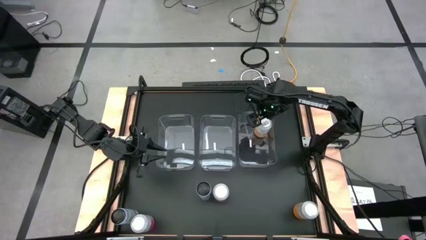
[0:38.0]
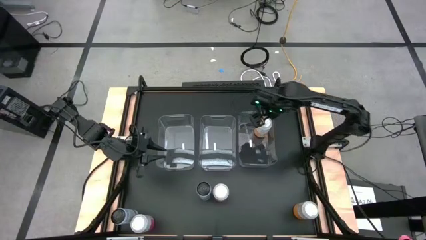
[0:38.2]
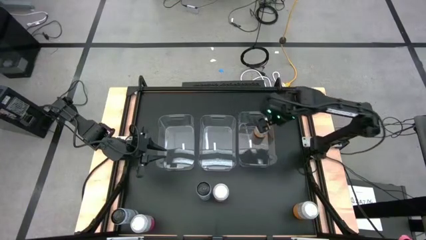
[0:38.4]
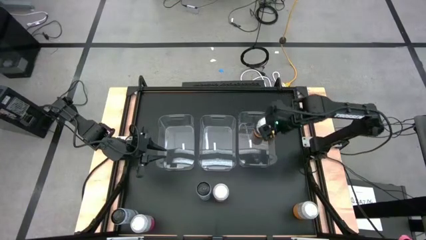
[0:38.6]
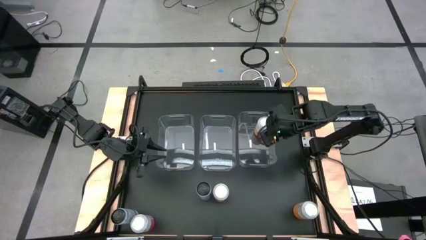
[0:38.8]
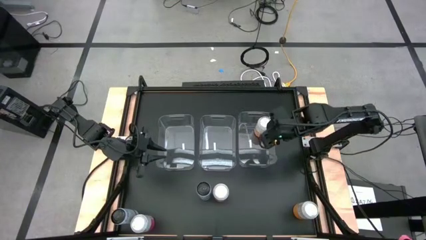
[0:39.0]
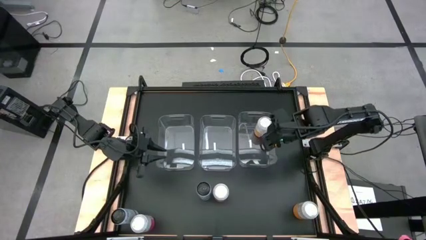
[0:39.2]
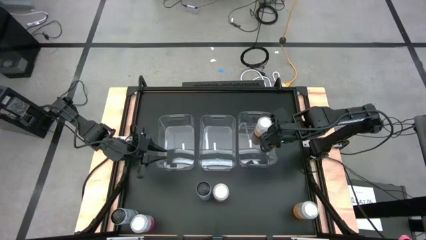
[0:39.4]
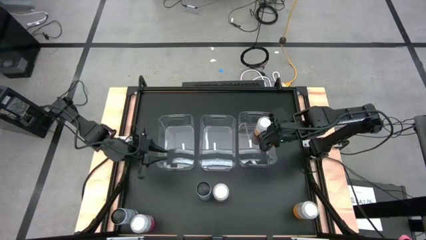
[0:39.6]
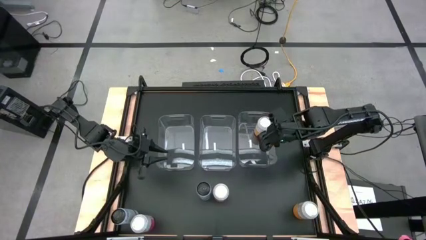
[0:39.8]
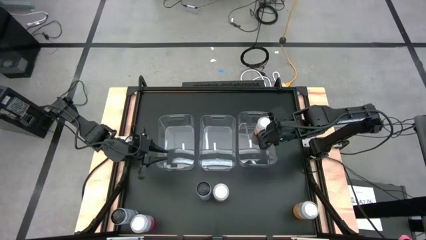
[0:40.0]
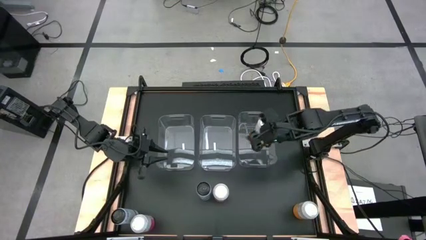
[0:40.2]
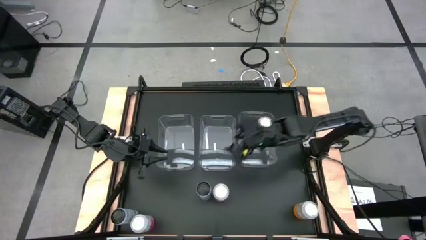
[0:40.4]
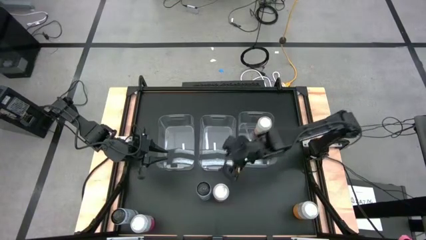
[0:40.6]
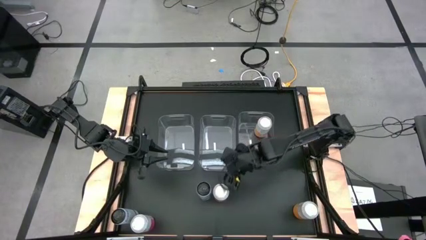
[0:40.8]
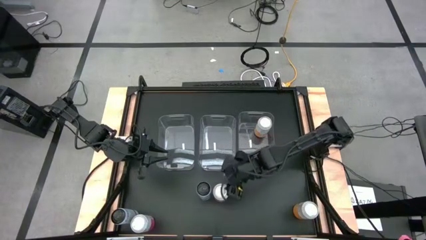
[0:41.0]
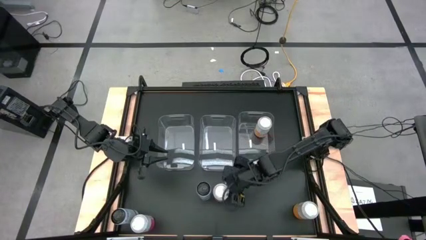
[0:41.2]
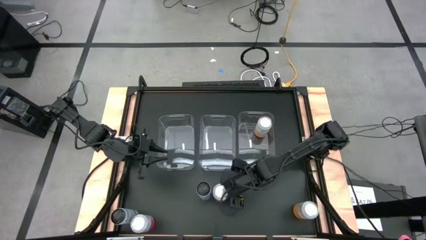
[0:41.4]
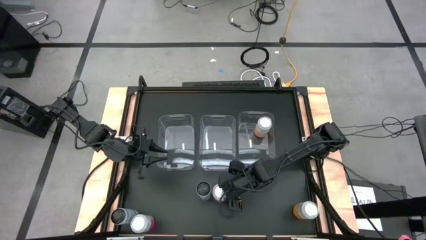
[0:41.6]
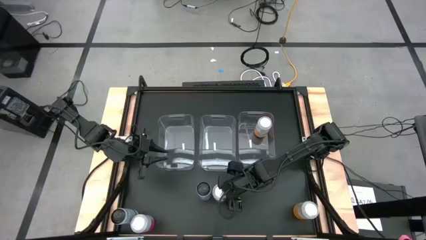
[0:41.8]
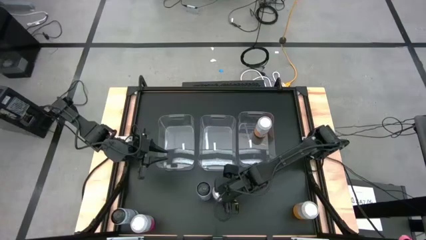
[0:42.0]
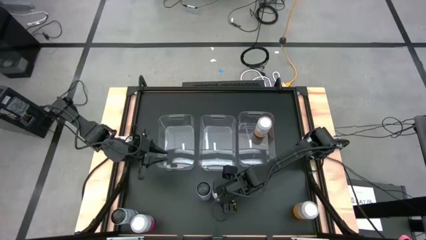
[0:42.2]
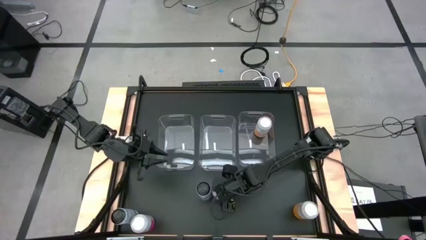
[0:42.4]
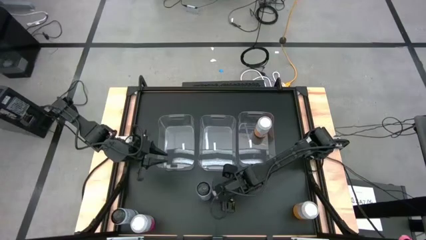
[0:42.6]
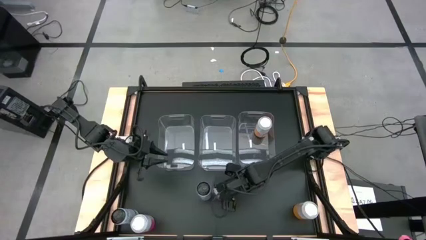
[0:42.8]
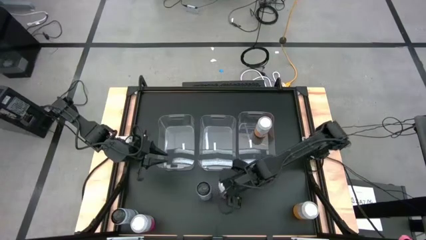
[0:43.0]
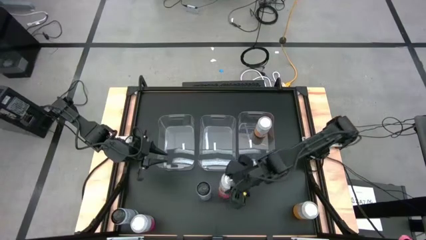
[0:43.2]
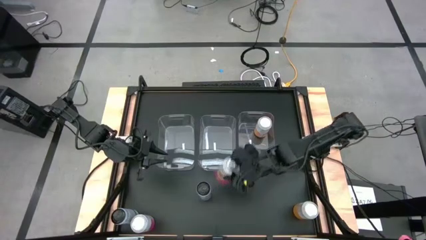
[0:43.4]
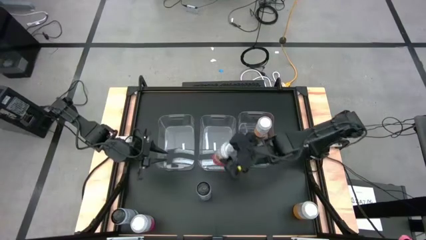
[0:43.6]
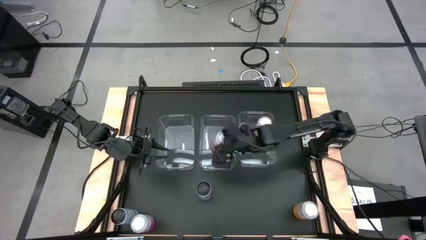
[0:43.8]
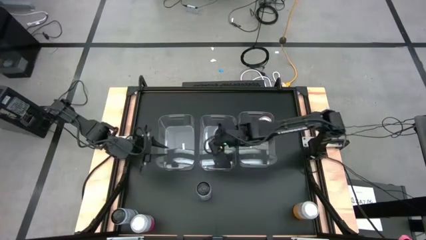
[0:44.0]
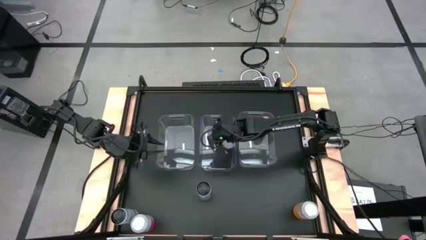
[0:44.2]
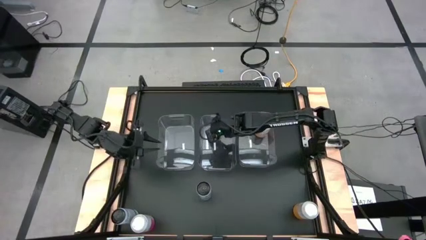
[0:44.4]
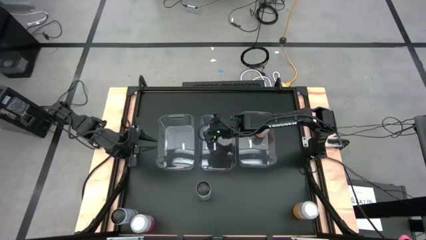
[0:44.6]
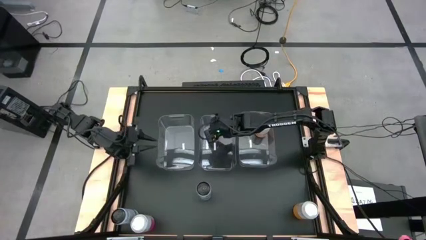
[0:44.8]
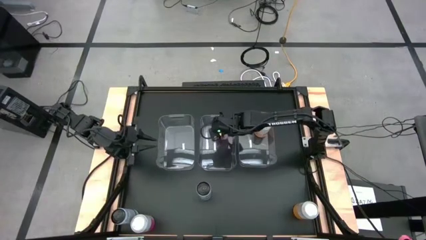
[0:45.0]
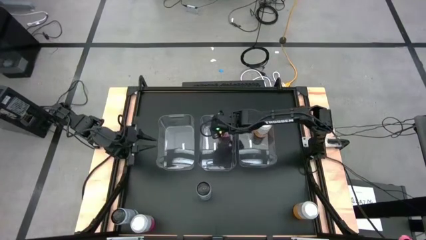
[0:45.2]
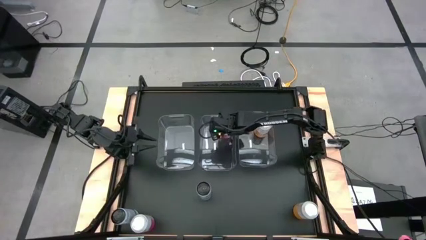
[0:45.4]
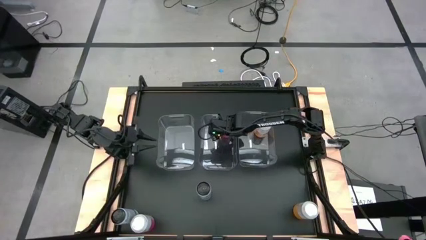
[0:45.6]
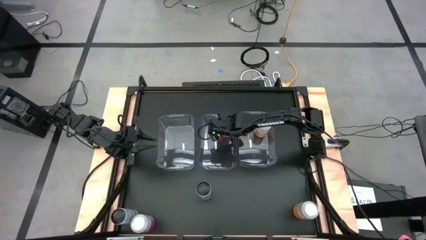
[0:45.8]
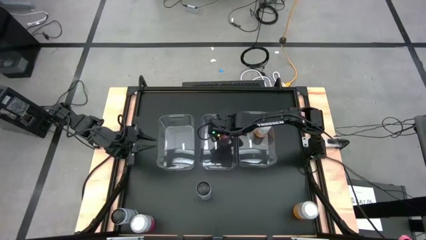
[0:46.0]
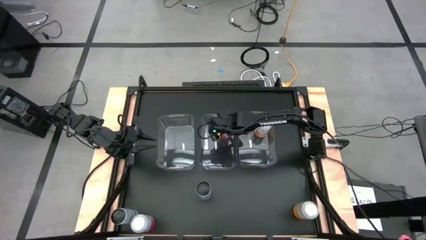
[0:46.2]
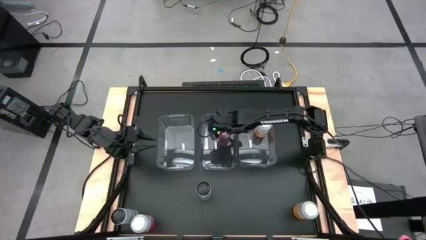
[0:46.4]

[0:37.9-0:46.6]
Task: Sort soda cans
Put the right pink-white soda can into the middle transparent bin

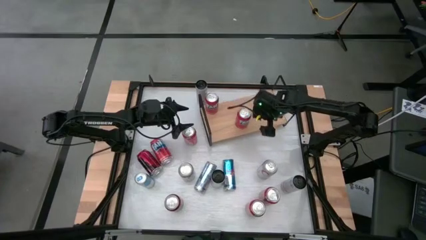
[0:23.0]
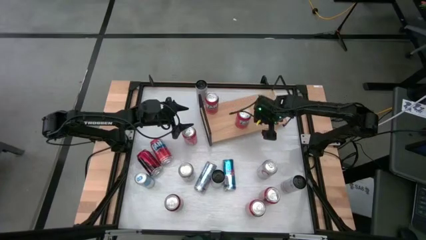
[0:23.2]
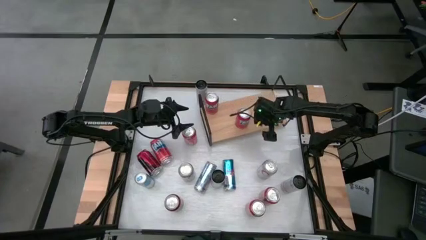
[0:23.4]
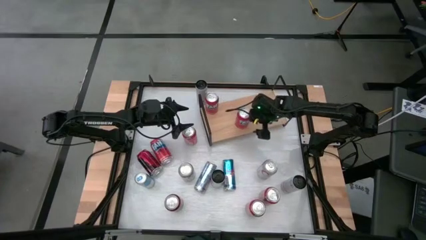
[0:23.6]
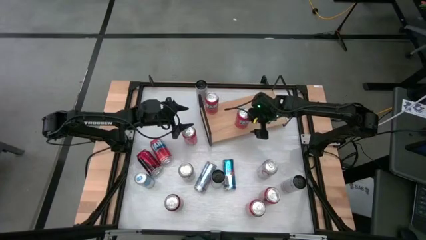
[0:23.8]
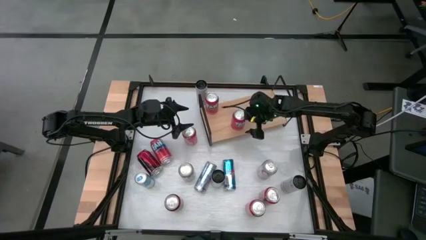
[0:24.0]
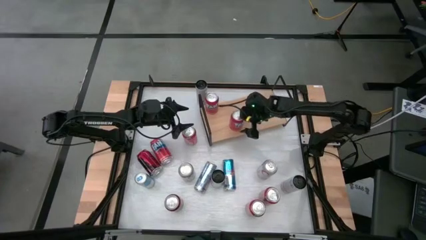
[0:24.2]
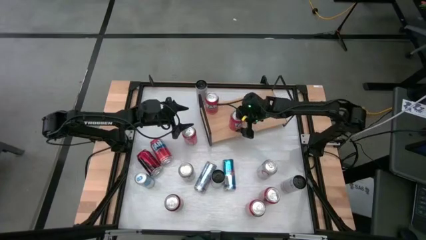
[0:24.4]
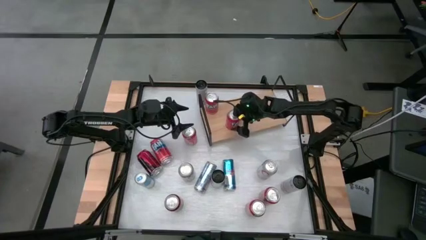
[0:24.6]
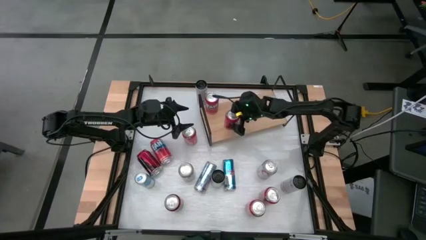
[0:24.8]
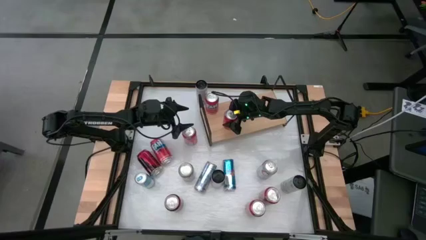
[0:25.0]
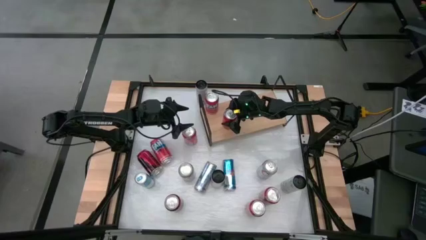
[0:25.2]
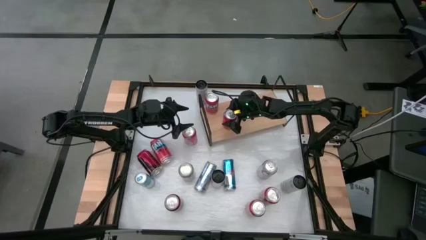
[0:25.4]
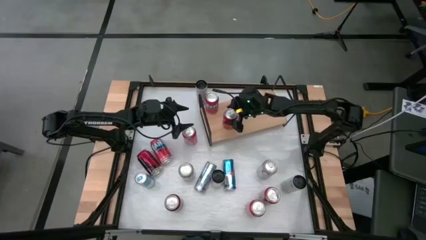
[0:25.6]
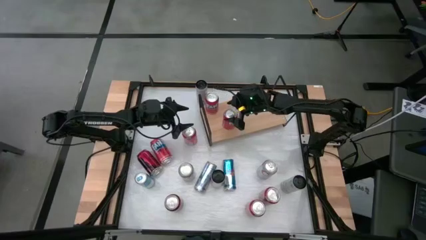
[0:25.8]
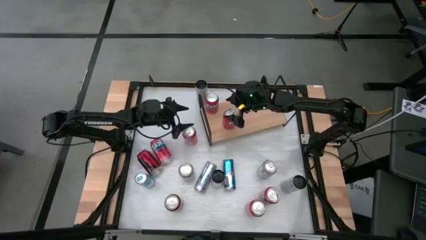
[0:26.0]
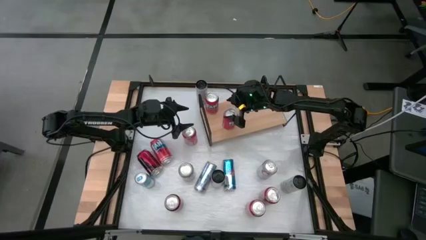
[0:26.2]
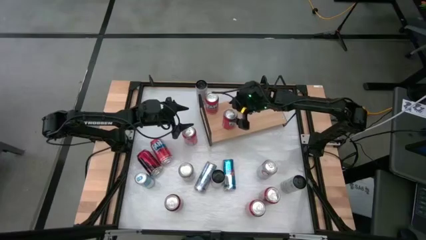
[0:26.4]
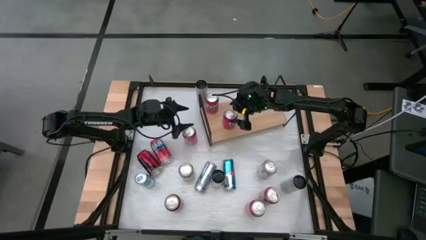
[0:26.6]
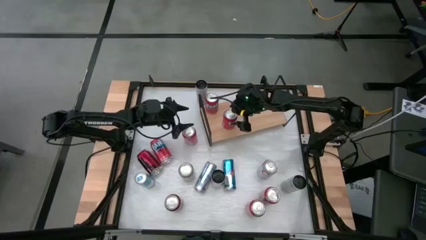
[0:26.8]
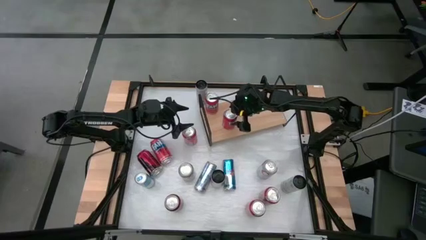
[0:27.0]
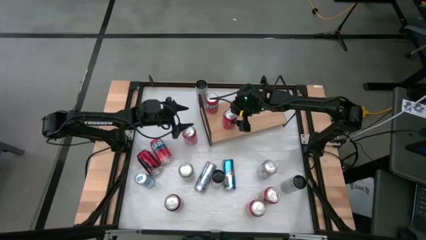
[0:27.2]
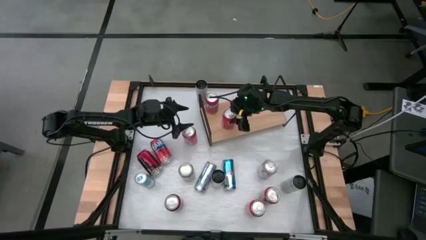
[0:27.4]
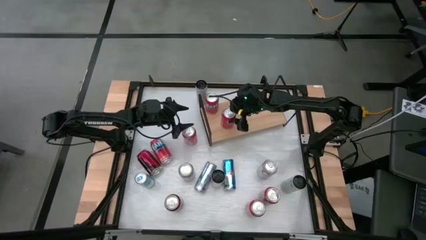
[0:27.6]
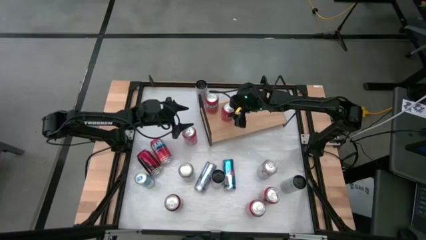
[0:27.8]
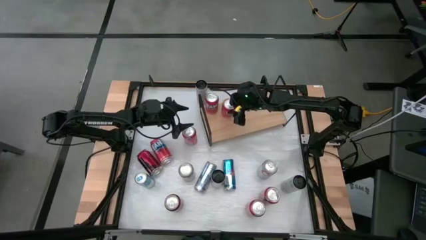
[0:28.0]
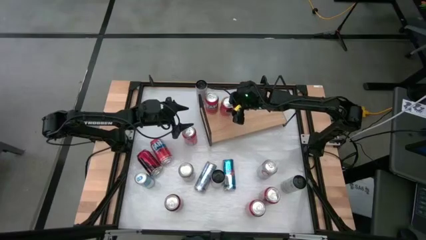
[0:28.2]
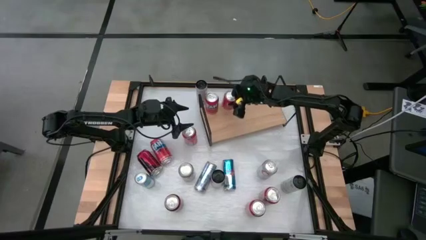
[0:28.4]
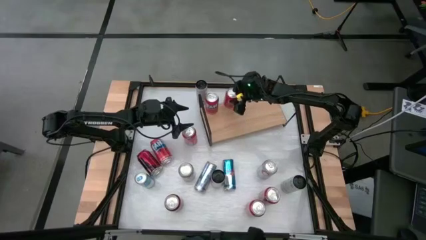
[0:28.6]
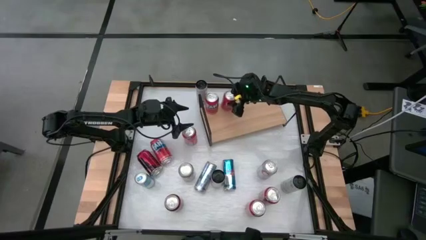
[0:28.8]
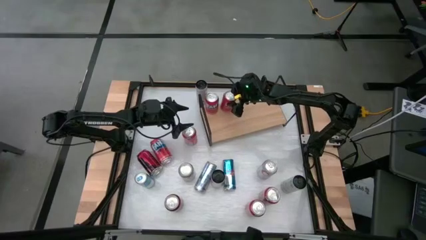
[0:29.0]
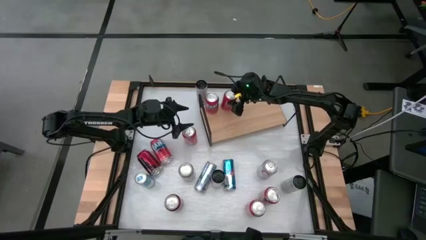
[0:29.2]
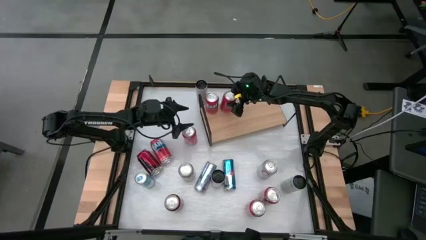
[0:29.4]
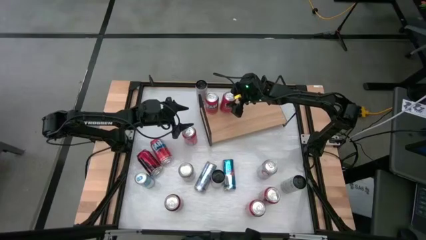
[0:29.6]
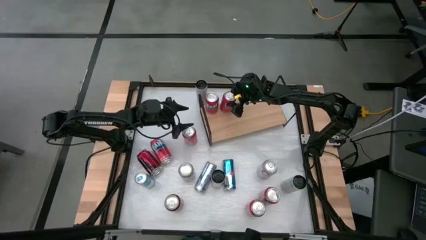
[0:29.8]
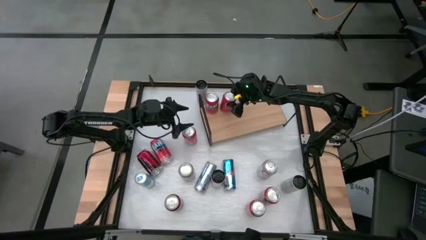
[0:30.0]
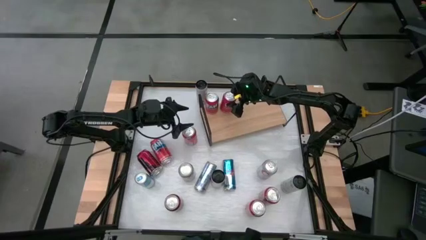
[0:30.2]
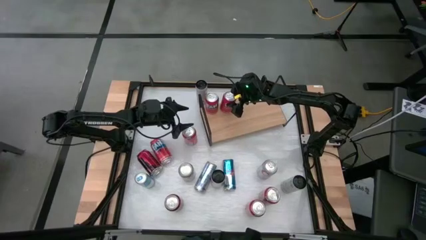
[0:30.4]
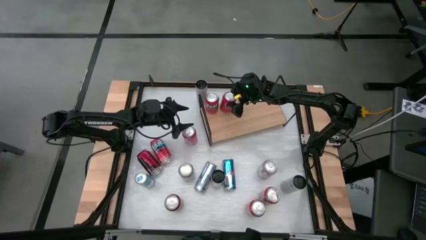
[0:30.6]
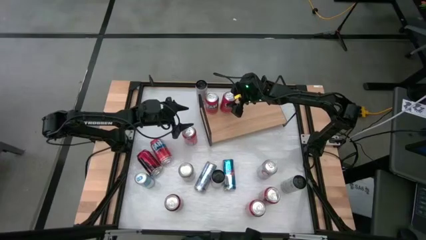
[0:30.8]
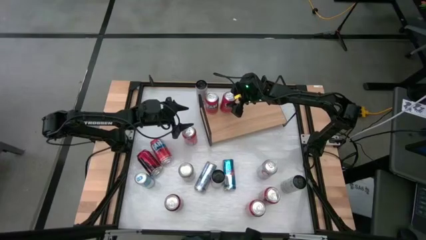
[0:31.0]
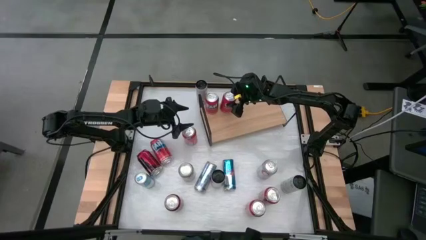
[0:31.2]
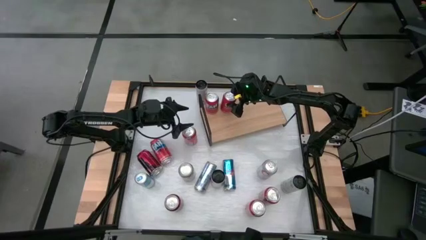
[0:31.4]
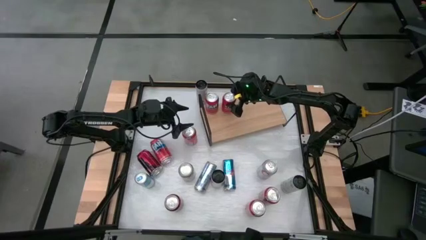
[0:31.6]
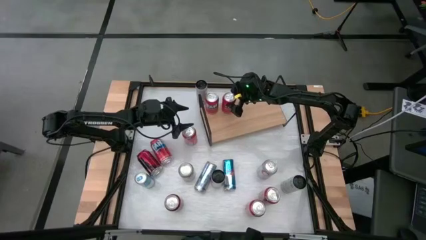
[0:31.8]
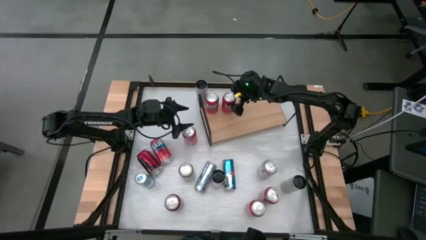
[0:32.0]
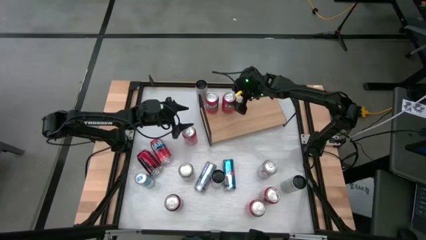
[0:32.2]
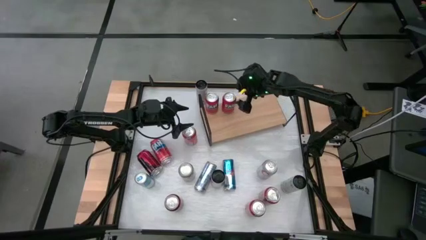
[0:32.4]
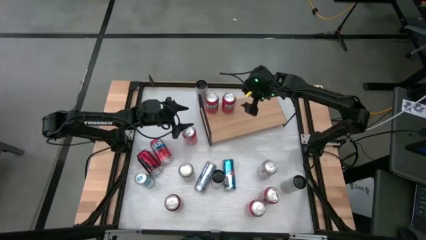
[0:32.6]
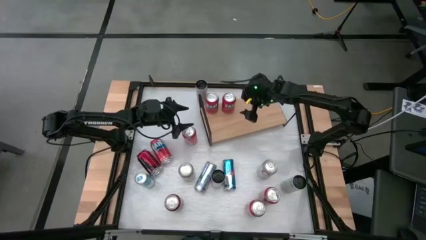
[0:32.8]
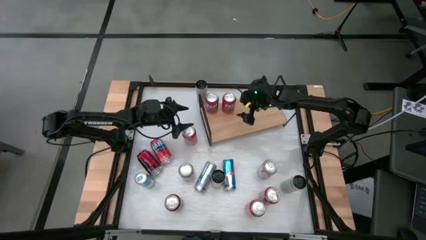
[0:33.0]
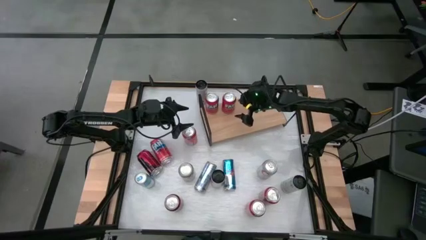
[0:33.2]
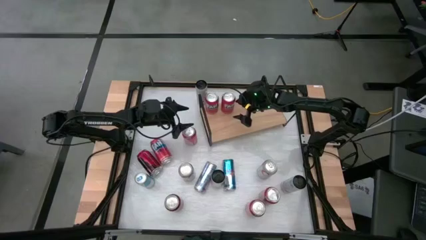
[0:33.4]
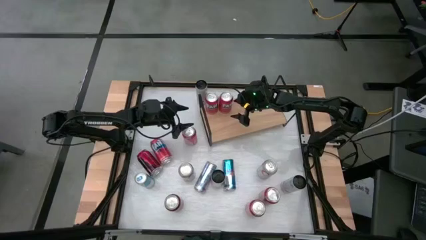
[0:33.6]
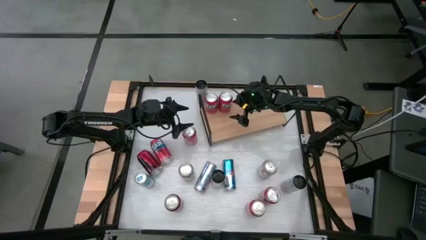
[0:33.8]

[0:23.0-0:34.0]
Task: Place canned beverage on shelf
Put the middle right orange soda can on the shelf
